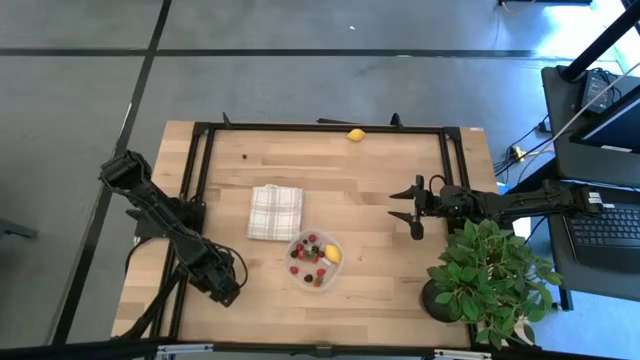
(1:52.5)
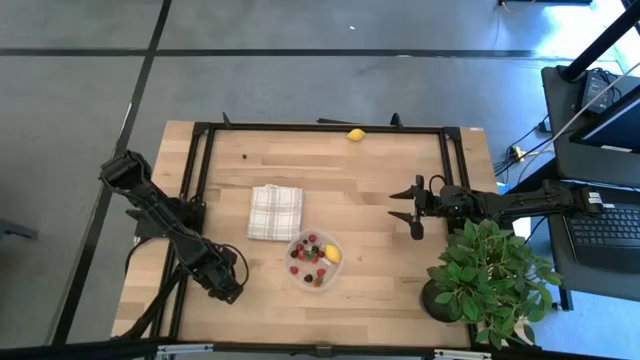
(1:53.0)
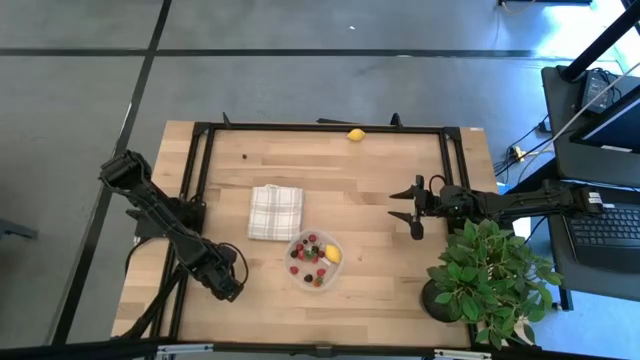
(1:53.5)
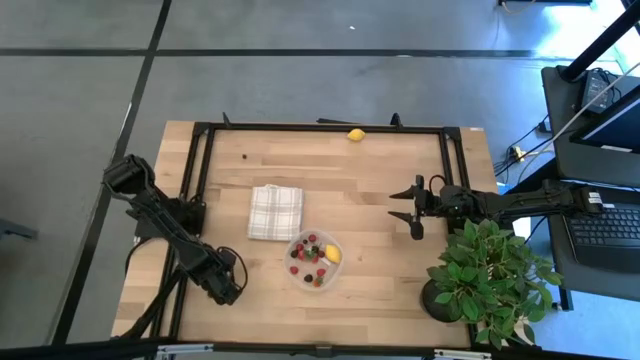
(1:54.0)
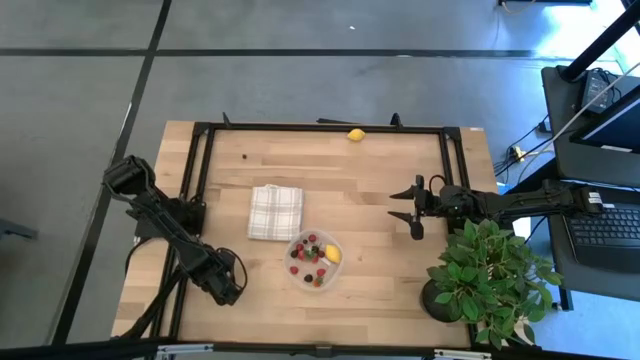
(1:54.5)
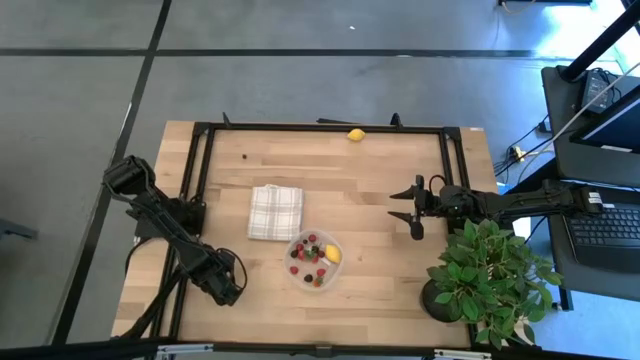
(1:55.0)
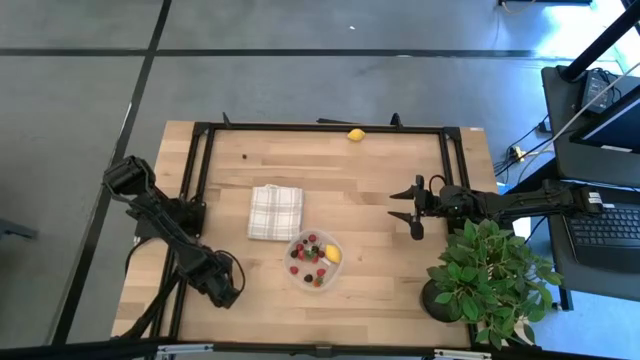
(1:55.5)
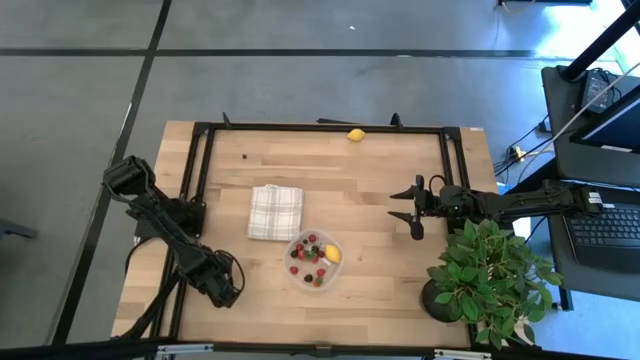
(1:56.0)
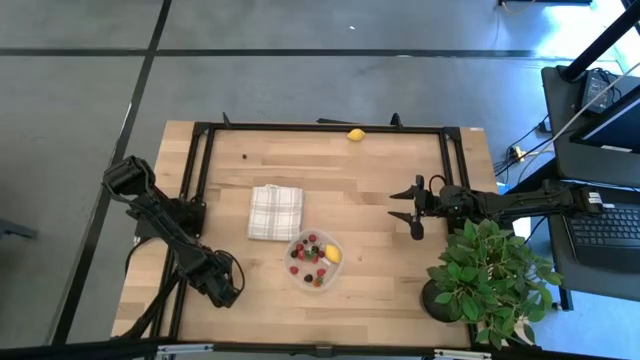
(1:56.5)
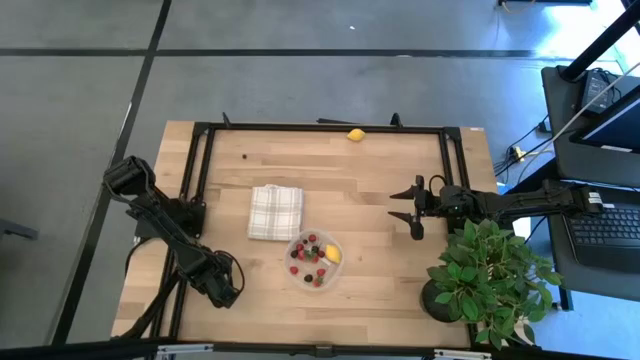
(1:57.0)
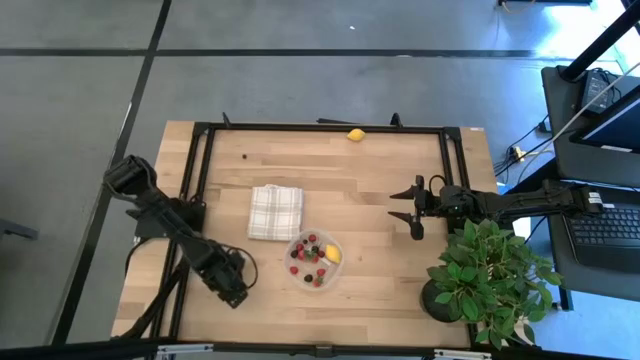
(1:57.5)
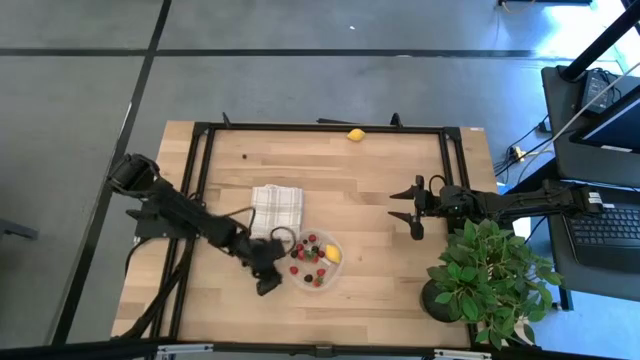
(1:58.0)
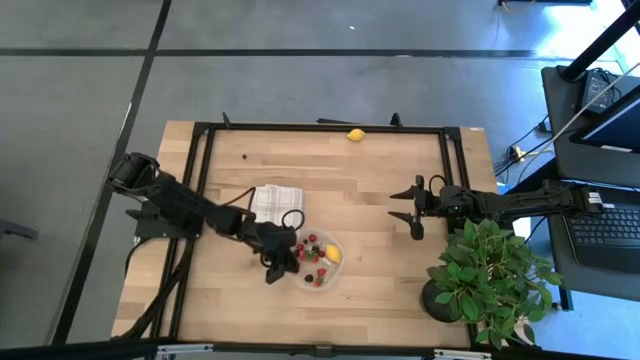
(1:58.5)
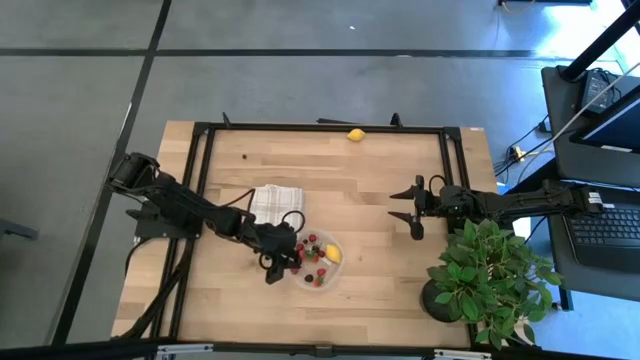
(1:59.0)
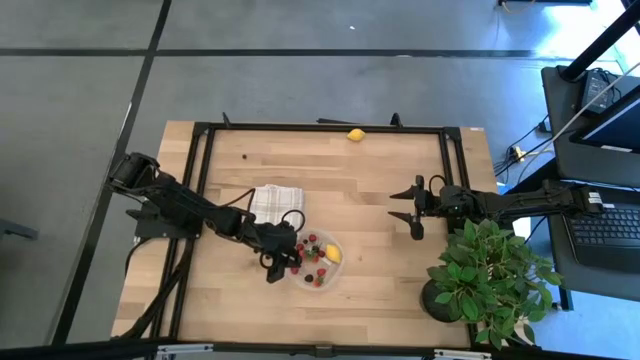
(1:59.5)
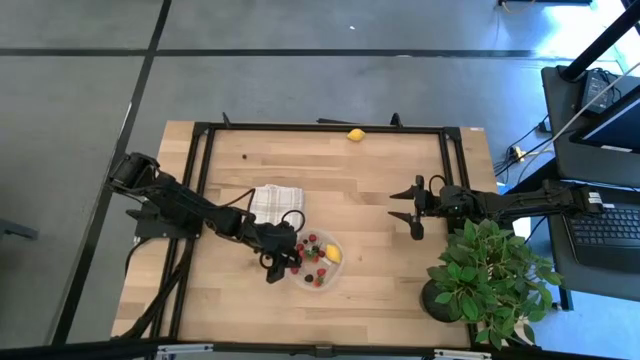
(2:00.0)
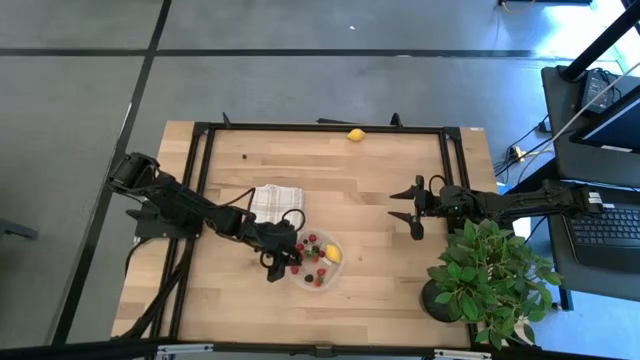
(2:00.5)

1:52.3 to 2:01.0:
Task: Pick and placing Produce into tupperware
Put the black cherry into the transparent container

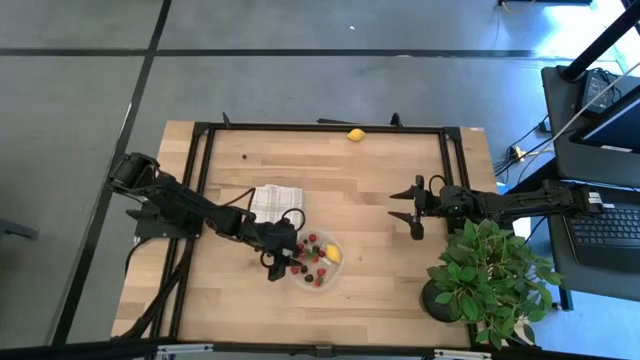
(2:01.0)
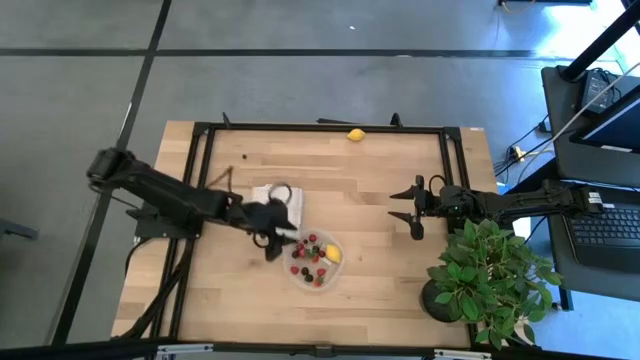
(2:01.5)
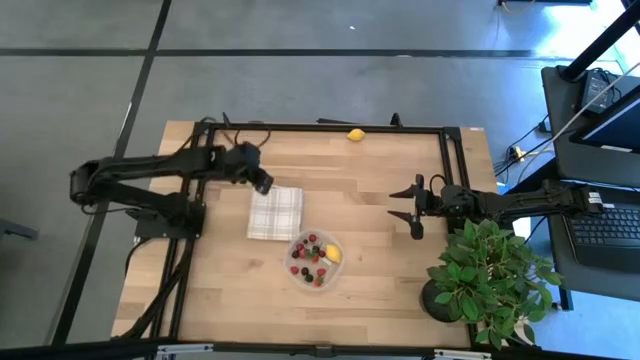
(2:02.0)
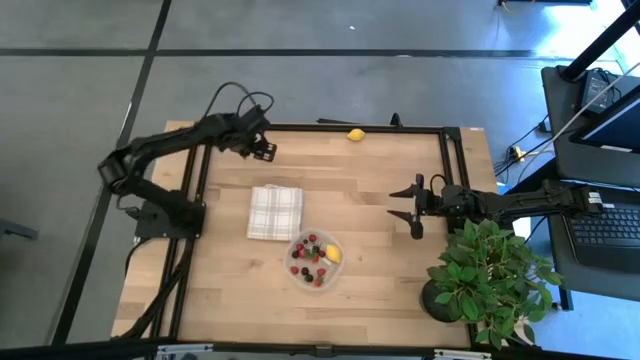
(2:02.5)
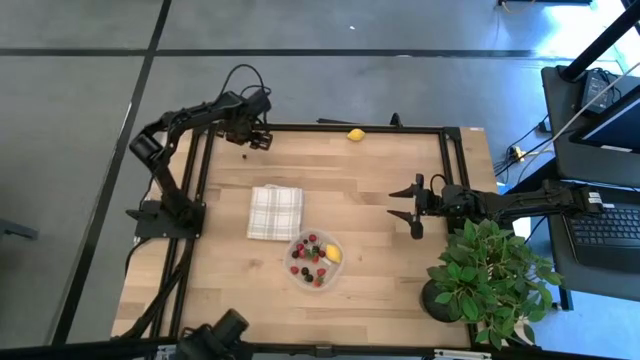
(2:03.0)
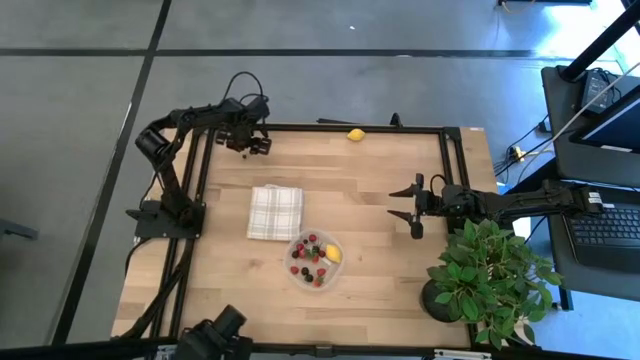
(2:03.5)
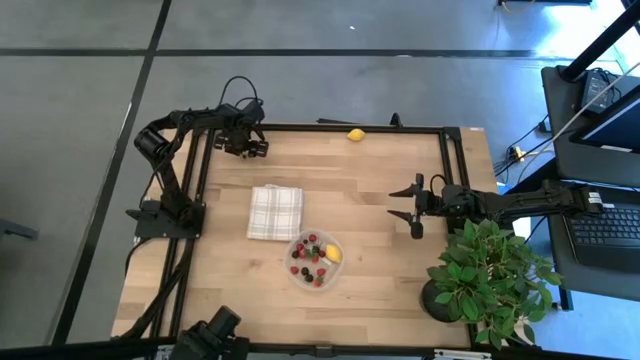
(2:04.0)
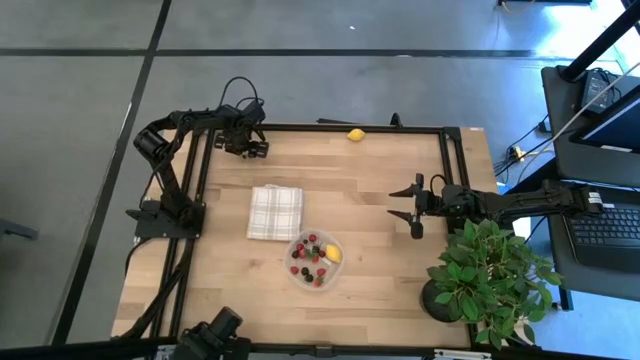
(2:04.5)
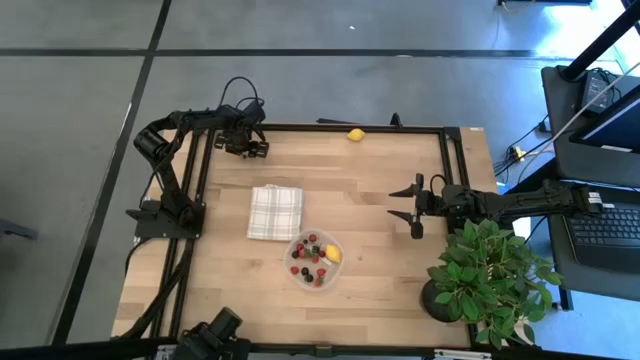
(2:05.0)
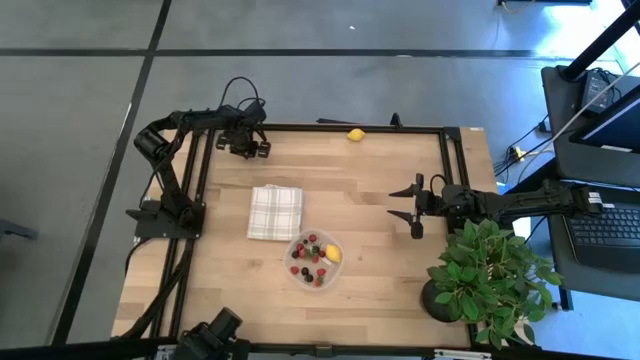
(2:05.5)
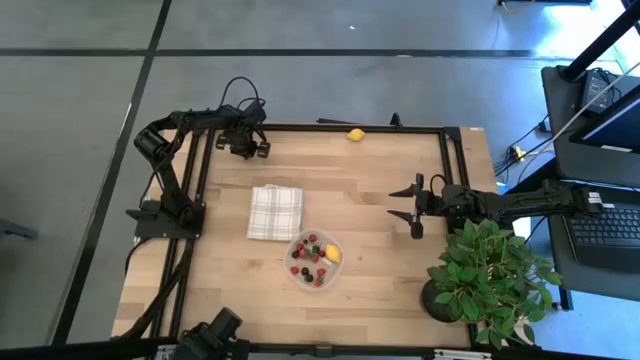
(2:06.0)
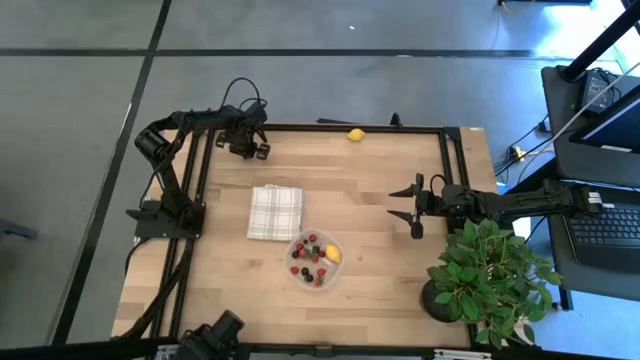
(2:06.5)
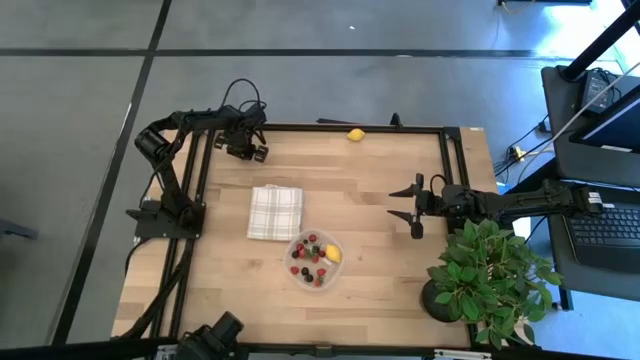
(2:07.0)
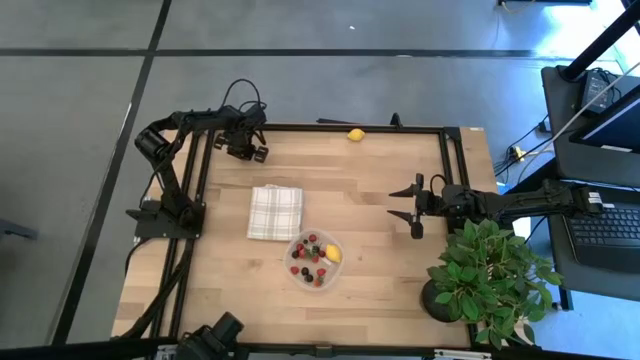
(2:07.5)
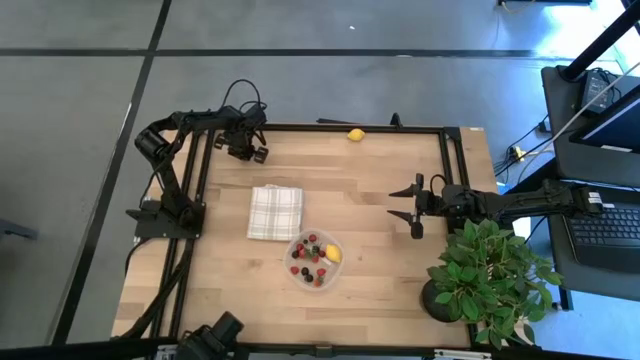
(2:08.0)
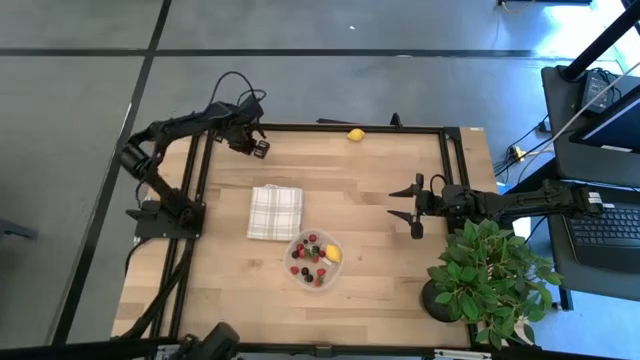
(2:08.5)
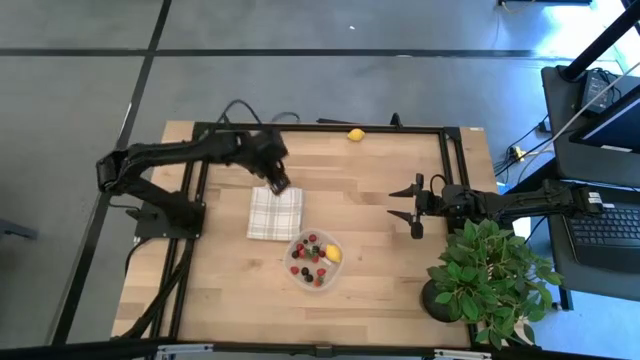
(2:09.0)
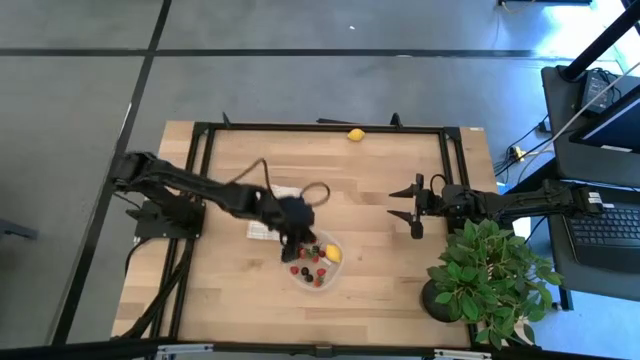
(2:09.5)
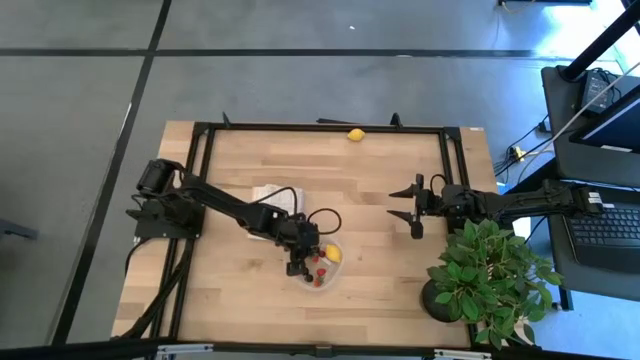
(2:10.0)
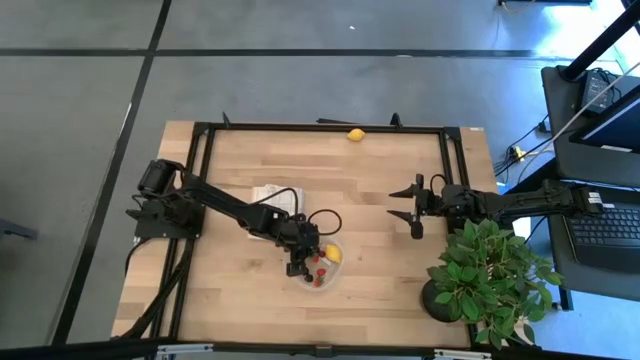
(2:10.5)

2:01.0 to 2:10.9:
Put the blueberry into the transparent container

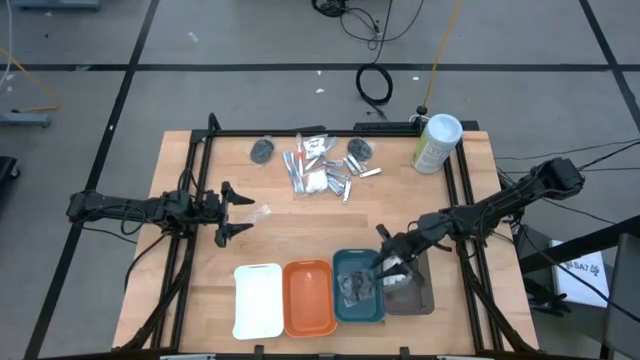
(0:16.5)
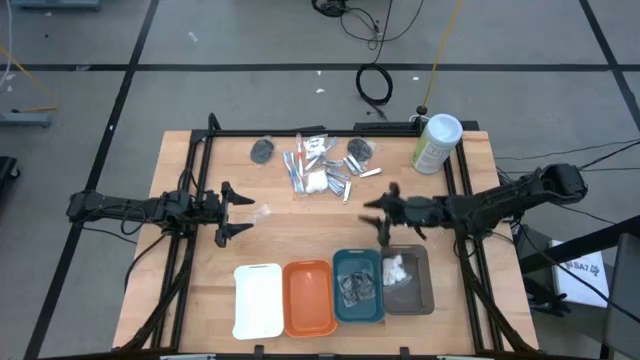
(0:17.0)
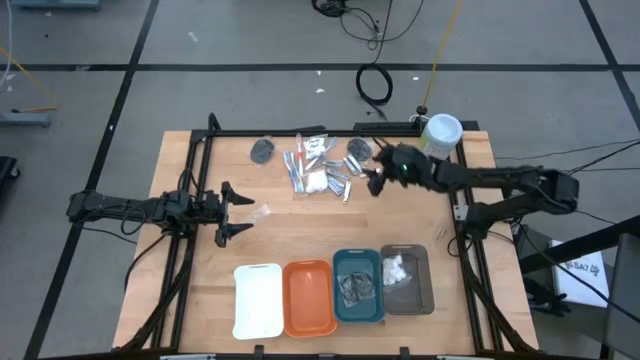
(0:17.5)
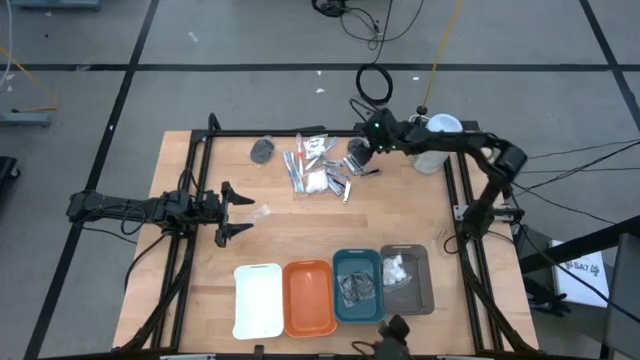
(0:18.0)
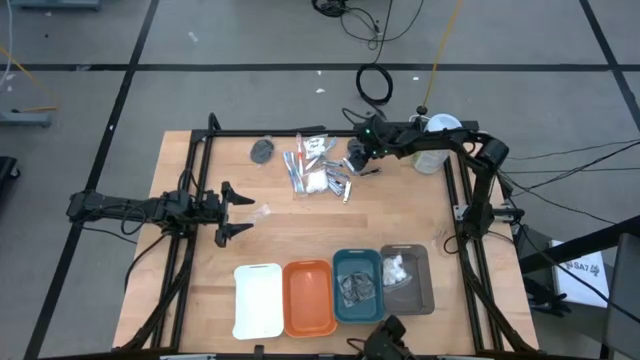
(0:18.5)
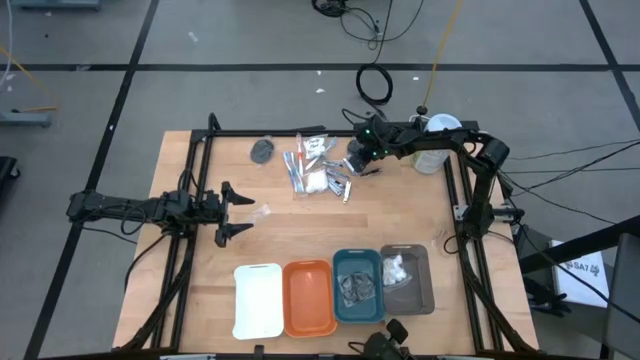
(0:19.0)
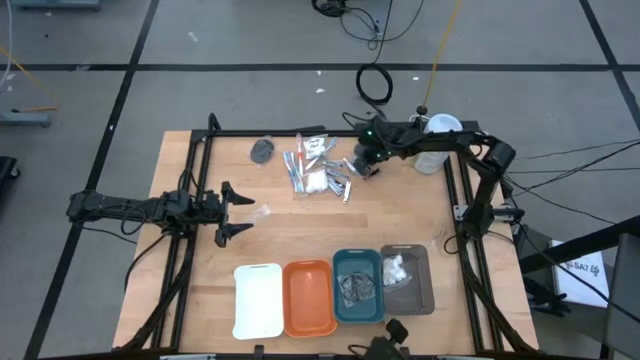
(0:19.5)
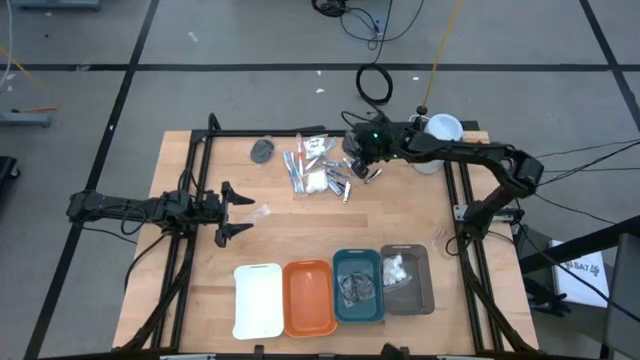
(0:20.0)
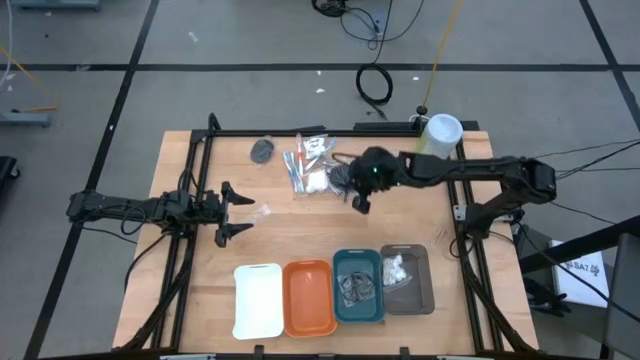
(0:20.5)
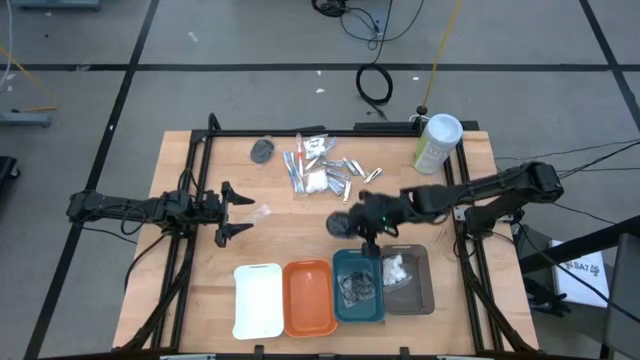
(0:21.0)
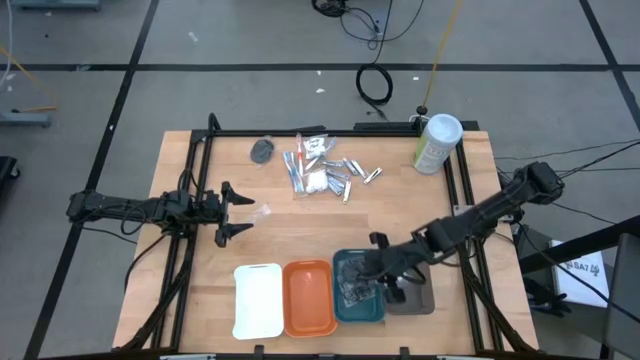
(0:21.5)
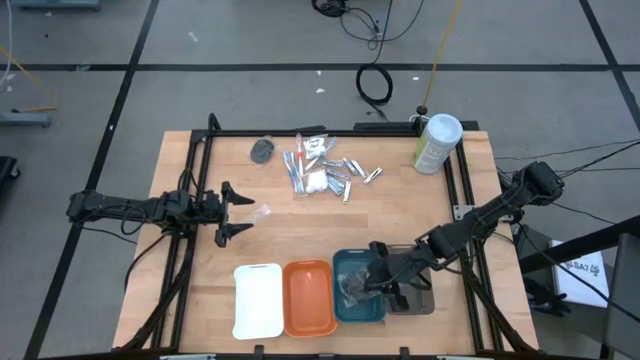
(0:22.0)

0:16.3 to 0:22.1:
Task: Pick & Place Travel size toiletries
Put the black hairbrush into the blue bin
